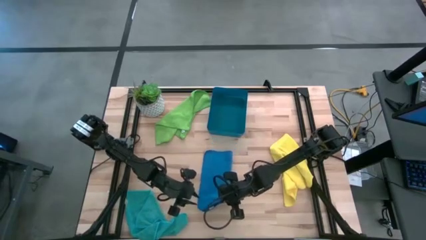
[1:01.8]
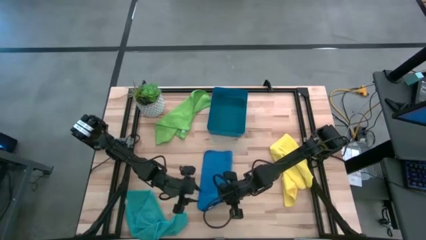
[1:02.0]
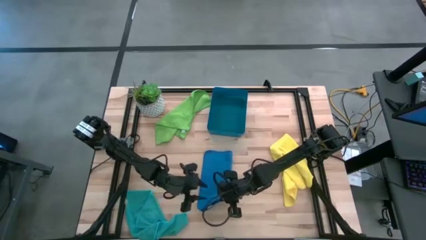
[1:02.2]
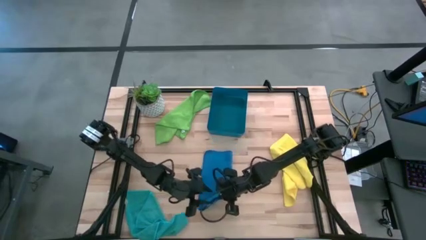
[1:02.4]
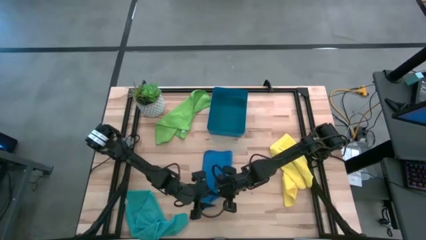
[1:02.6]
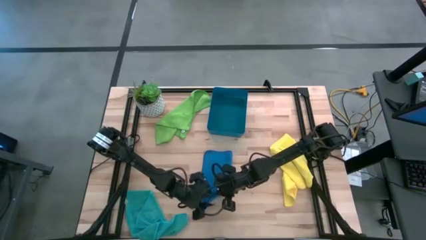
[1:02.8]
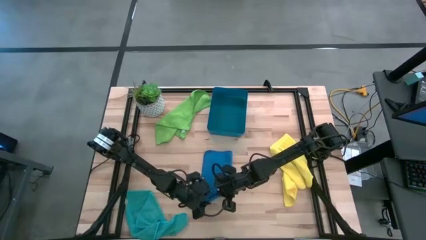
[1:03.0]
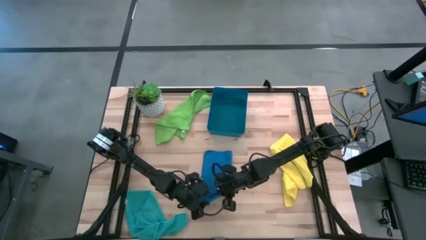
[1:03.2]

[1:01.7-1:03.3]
Task: Fold microfiber towels
Fold the blue microfiber cloth

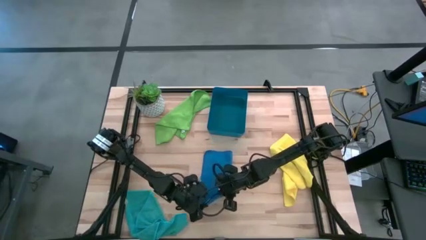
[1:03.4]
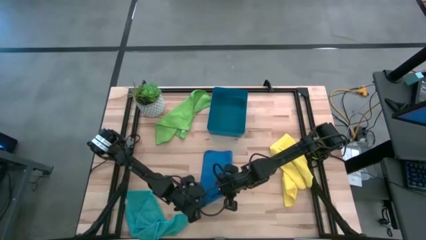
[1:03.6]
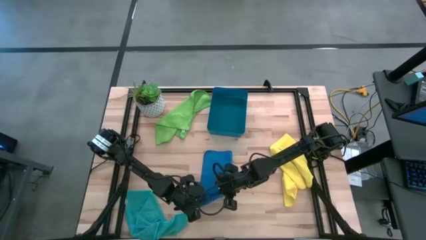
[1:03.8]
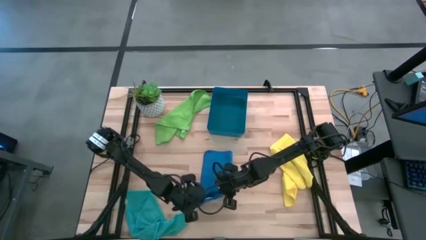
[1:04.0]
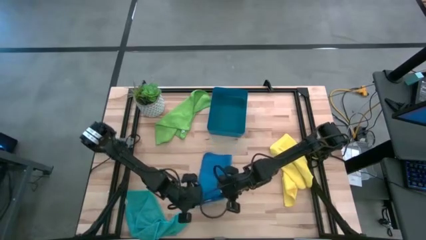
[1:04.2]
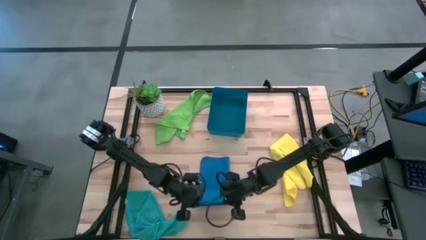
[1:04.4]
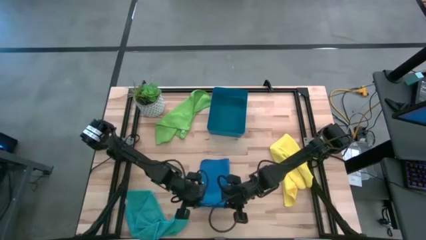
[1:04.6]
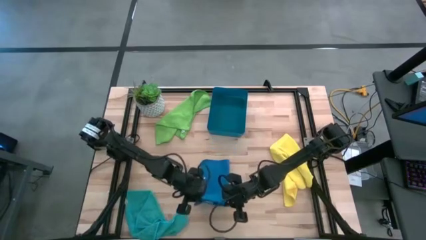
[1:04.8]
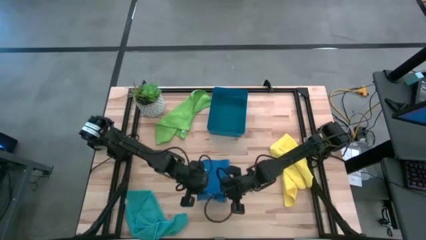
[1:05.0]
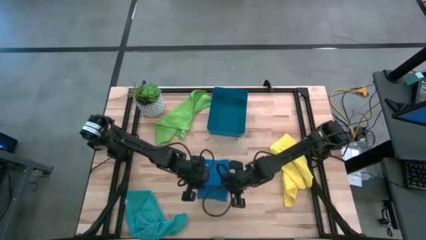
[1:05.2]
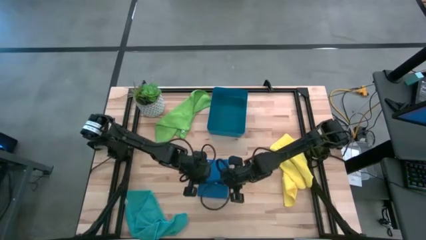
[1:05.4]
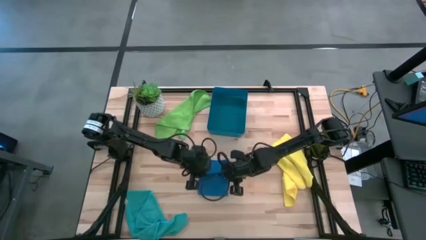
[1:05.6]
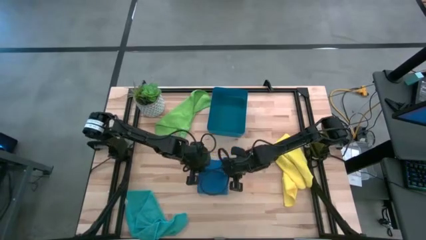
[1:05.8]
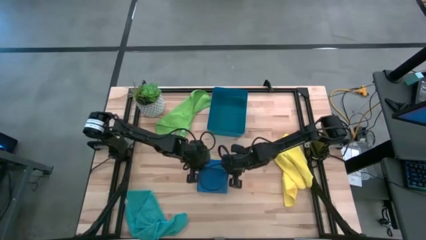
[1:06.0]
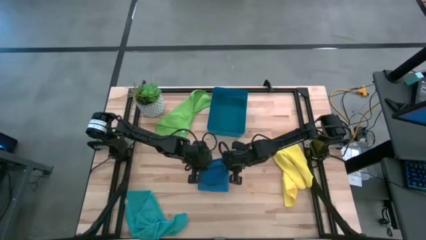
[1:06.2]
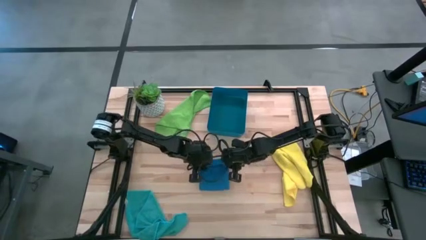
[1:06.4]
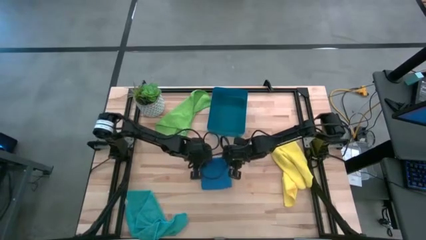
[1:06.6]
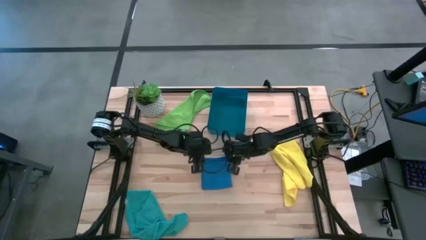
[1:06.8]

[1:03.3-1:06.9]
Fold the blue microfiber cloth

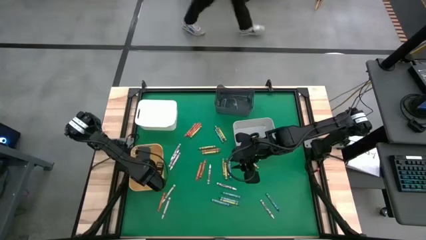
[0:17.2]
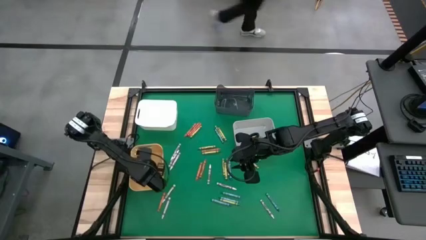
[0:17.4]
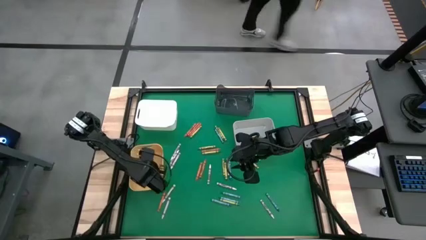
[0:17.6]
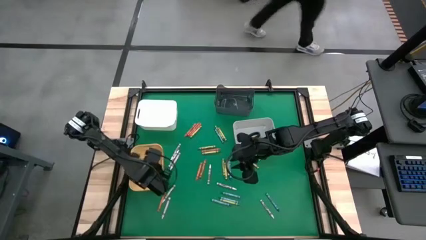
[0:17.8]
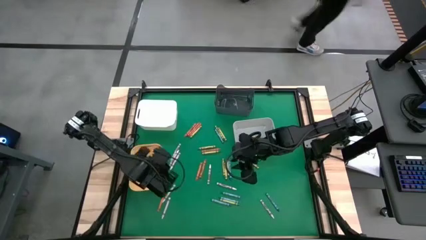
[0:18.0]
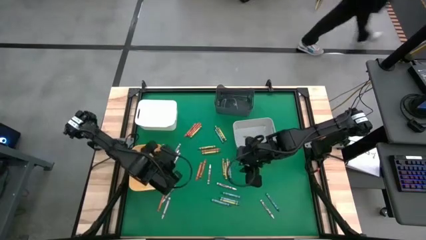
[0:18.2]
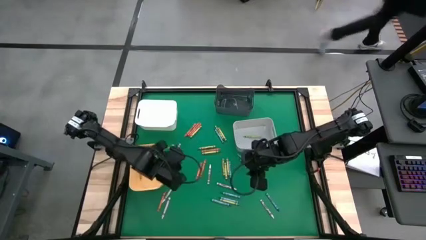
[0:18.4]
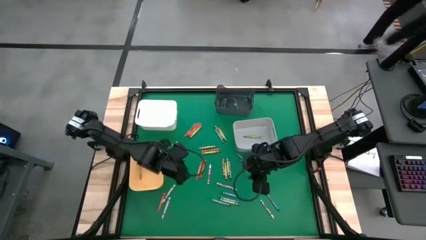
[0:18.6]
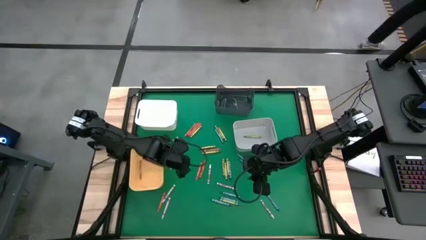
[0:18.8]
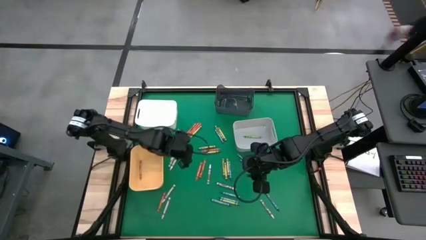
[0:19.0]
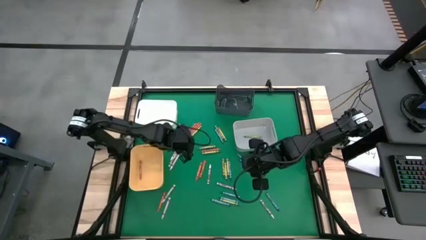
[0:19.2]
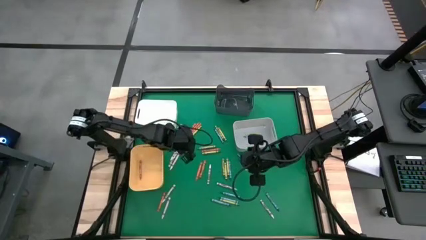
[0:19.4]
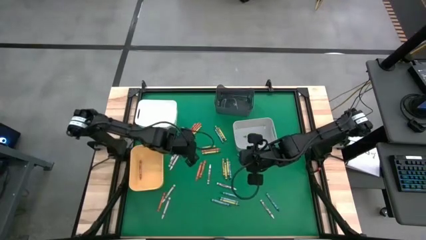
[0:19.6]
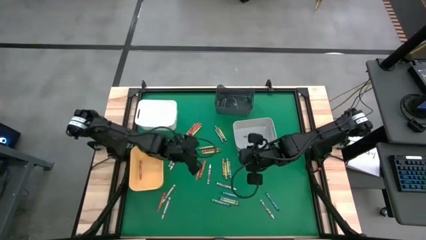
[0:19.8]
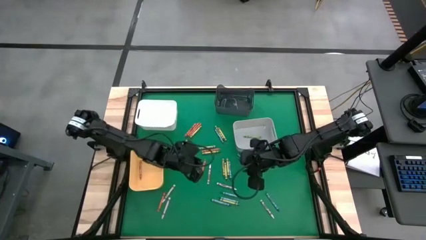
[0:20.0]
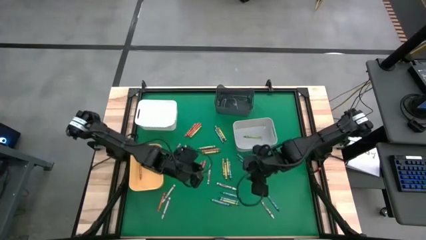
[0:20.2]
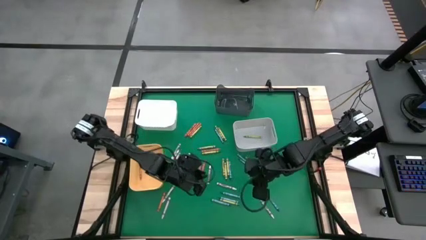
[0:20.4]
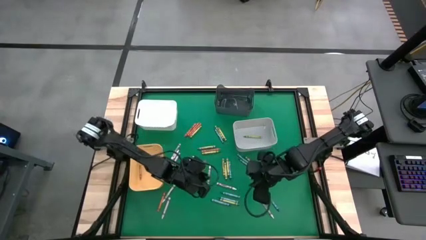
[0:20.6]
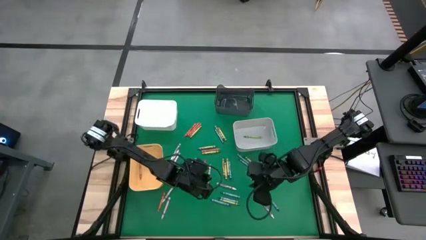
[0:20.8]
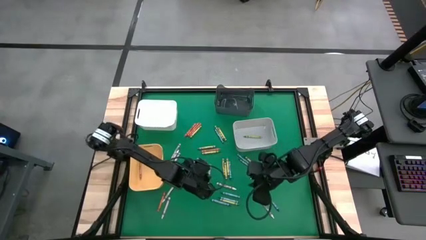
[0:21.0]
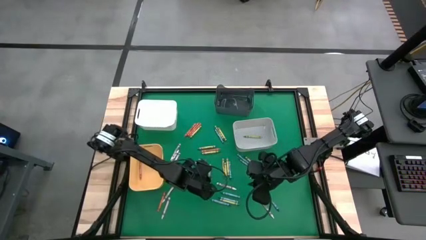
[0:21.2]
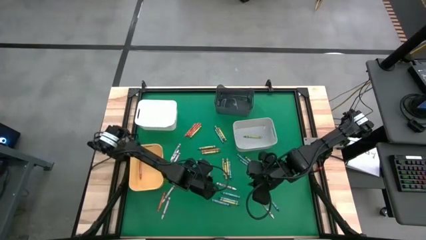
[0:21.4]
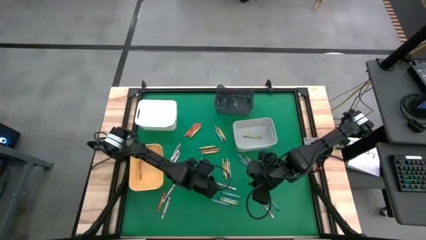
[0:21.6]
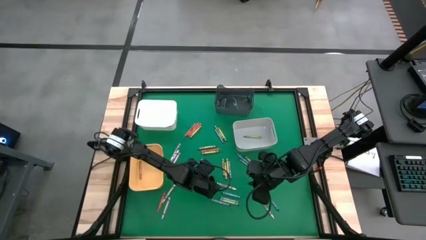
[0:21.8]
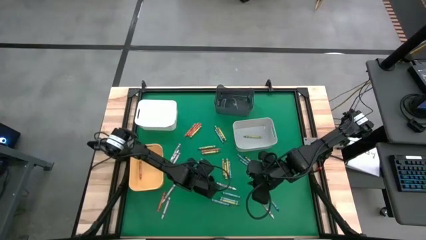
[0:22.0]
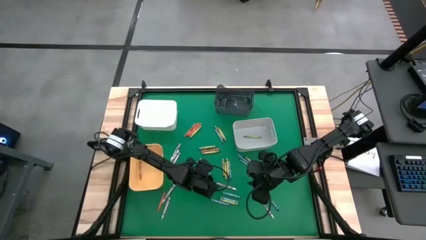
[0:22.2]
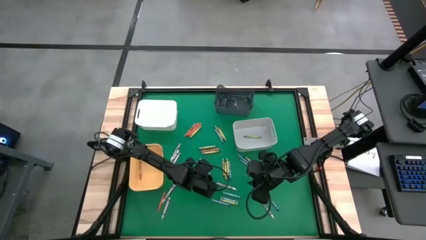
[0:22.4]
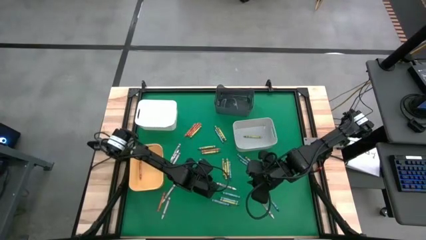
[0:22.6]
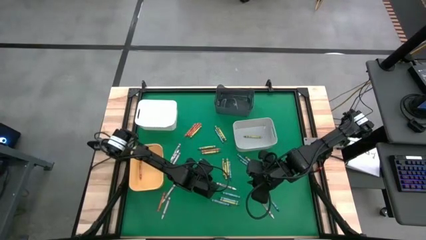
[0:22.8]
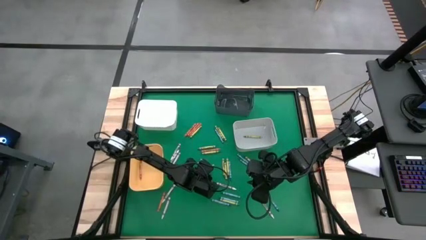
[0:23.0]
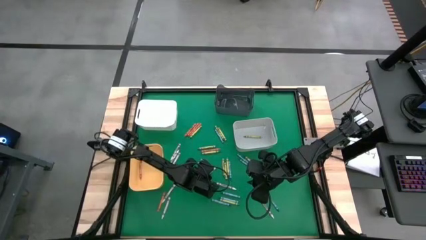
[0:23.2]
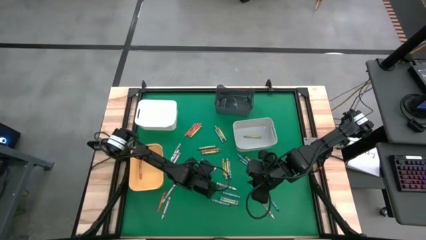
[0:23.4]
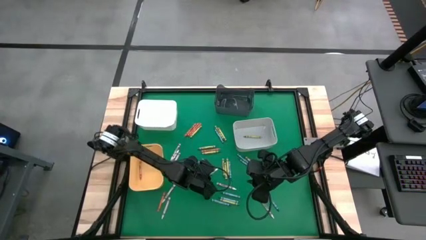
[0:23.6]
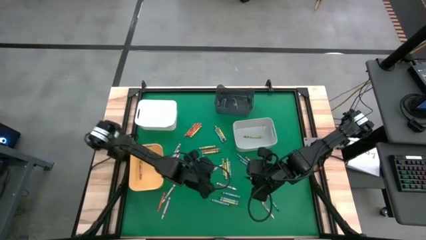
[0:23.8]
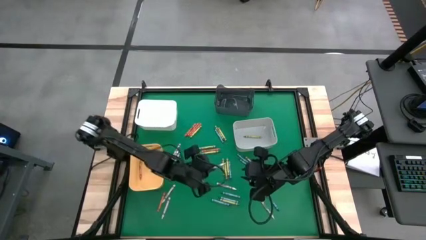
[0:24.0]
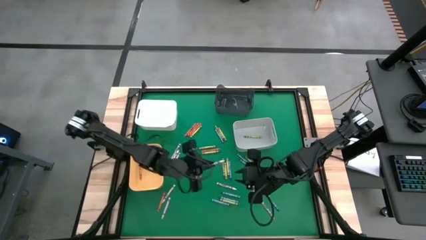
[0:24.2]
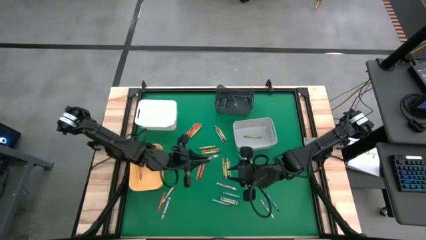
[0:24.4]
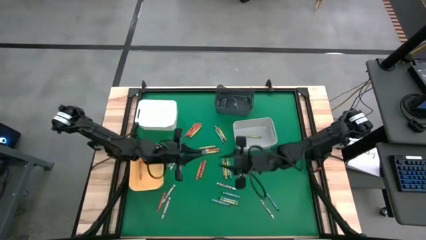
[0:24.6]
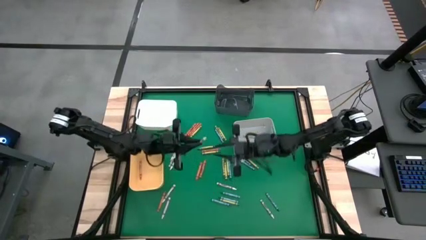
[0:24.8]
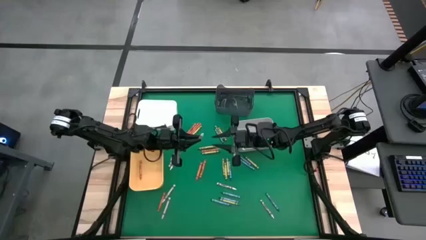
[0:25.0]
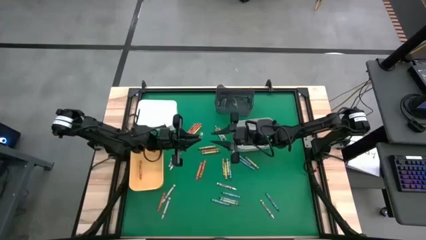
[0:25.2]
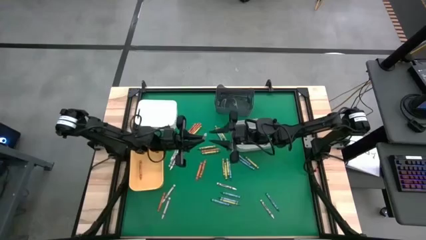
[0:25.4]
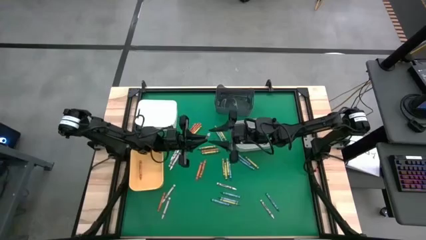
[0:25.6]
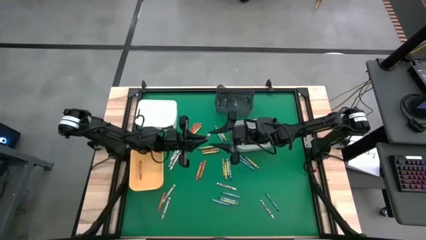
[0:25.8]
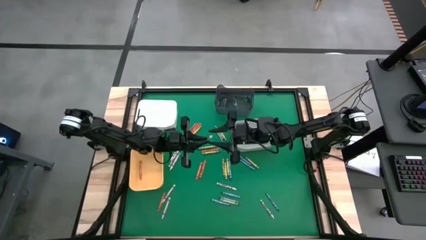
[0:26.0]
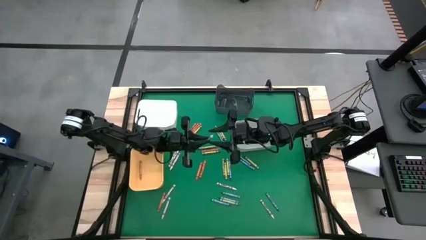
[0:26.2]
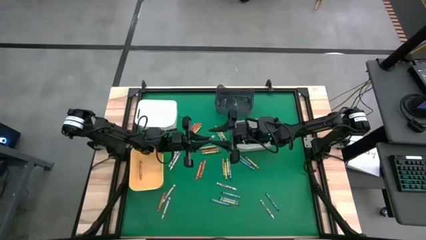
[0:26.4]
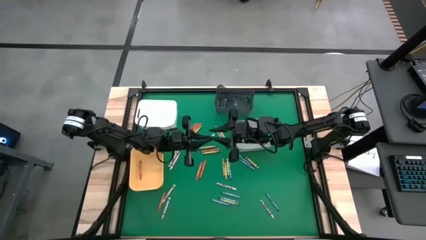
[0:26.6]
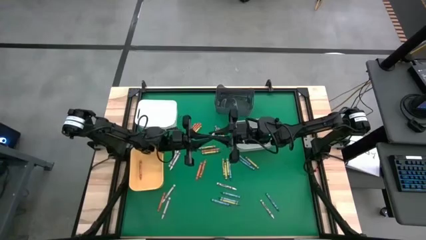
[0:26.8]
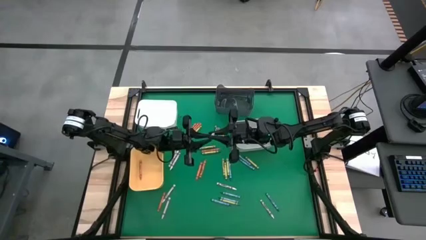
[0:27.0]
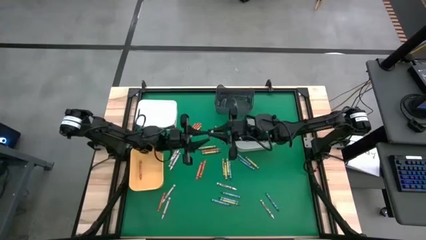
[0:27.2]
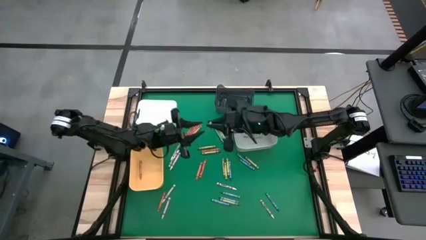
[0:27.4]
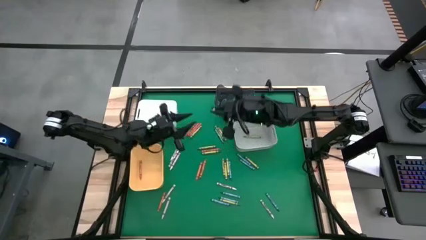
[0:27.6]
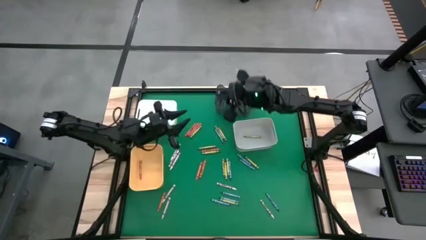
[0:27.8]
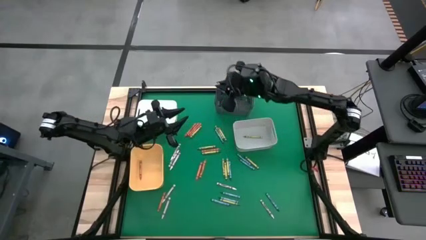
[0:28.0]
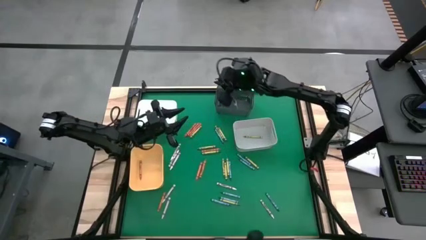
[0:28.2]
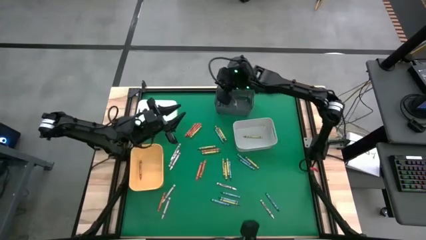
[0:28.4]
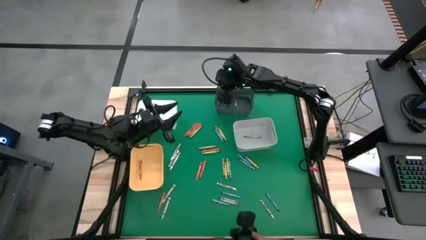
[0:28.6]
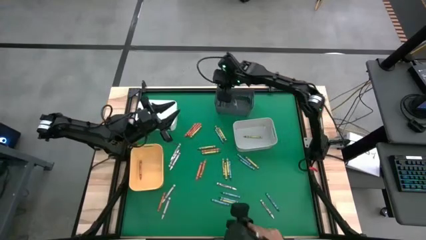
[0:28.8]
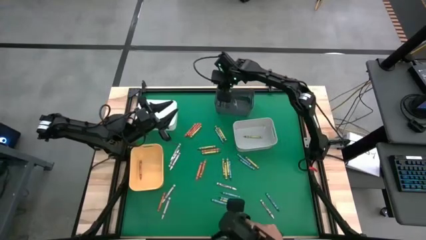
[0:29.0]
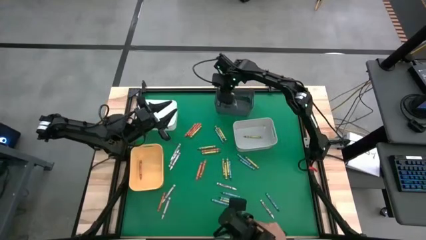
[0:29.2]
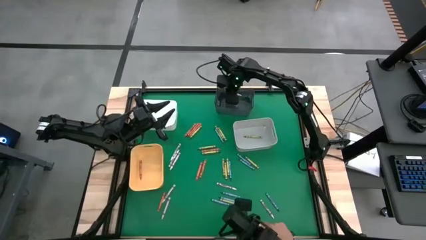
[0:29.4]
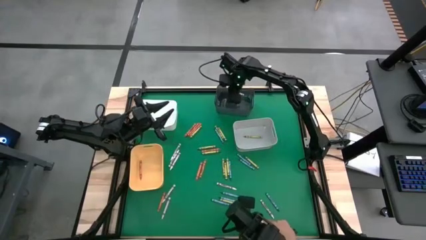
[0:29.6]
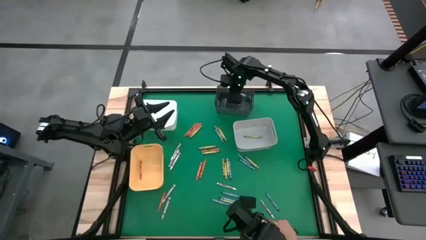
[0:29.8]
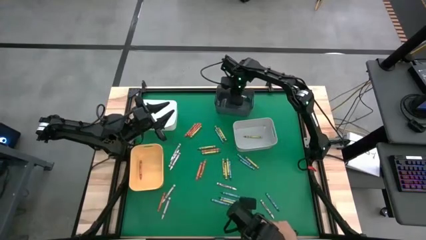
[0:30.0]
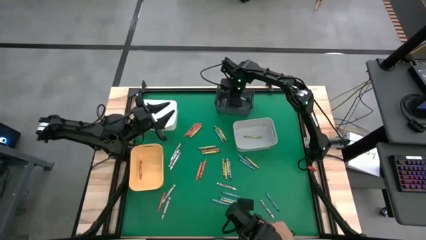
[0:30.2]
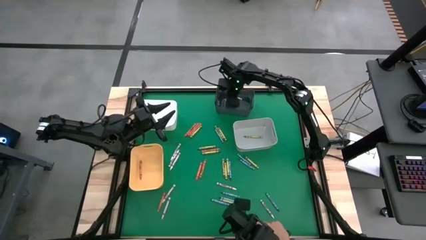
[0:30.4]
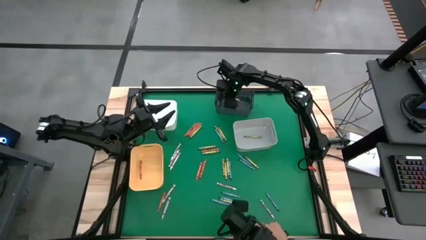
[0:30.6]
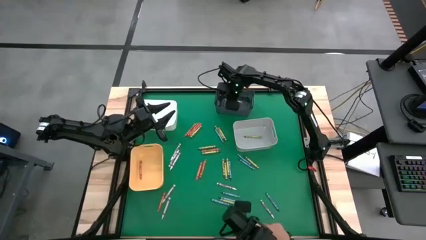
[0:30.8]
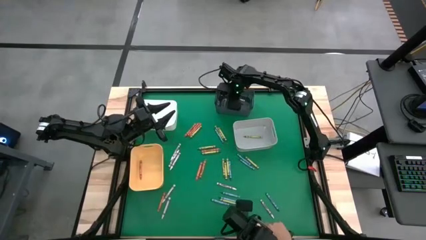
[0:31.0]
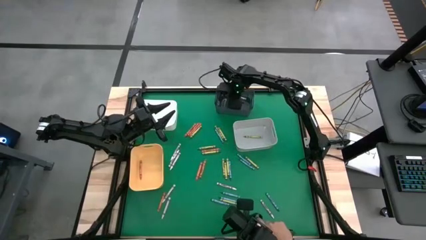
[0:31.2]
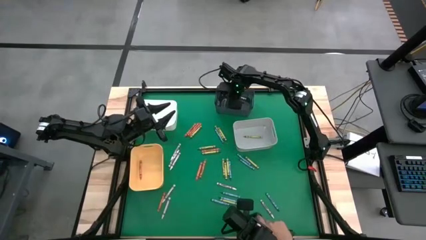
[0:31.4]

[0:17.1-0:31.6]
Task: Sort crayons
Put the white crayon into the black bin
